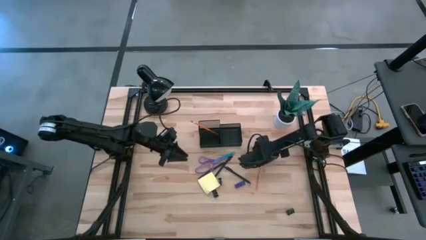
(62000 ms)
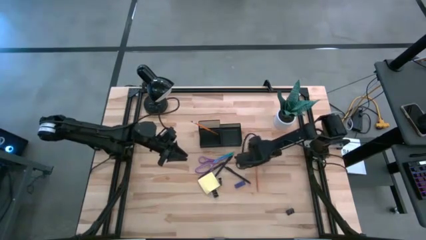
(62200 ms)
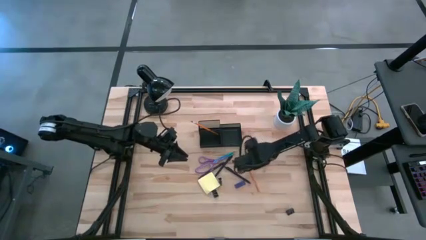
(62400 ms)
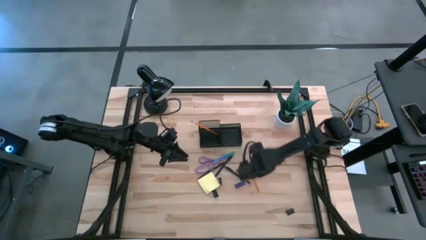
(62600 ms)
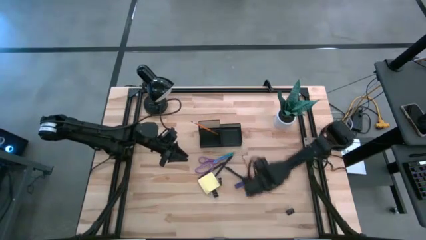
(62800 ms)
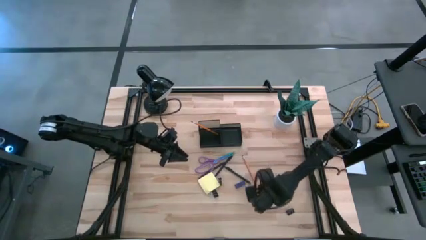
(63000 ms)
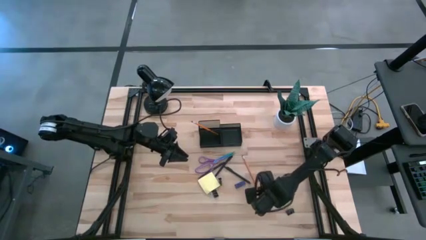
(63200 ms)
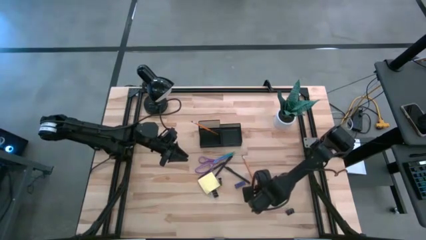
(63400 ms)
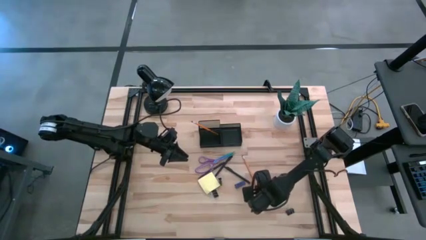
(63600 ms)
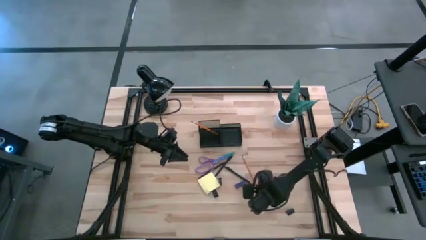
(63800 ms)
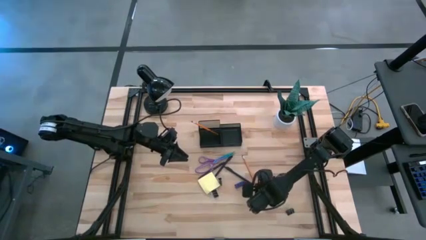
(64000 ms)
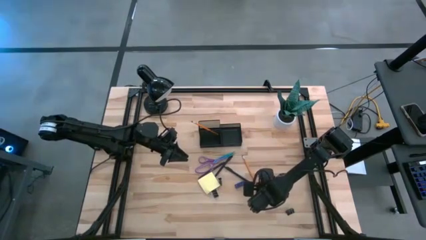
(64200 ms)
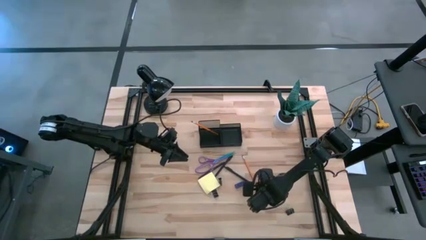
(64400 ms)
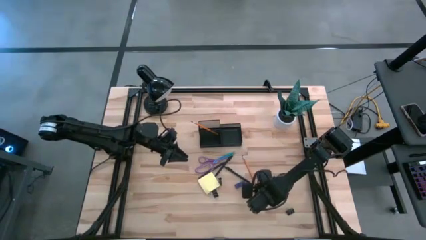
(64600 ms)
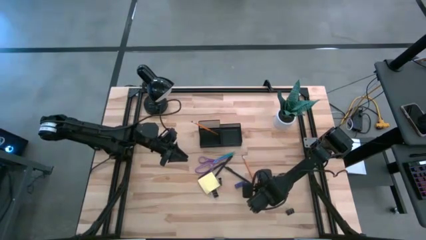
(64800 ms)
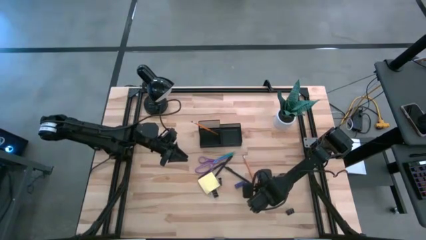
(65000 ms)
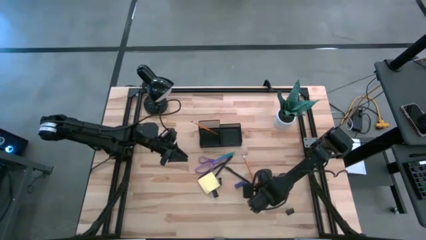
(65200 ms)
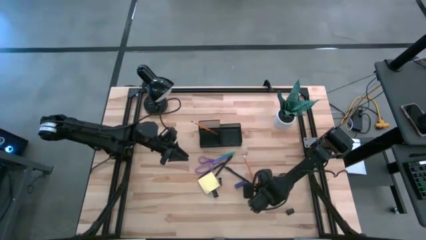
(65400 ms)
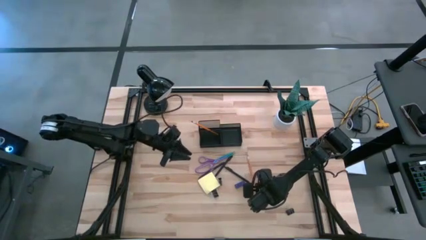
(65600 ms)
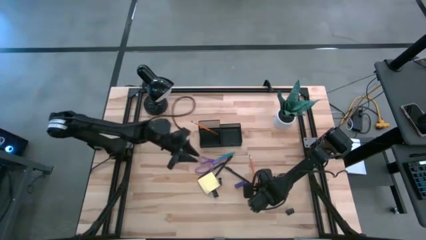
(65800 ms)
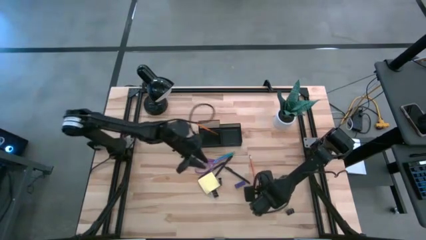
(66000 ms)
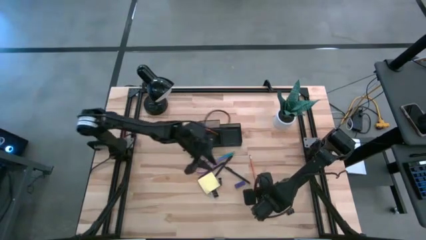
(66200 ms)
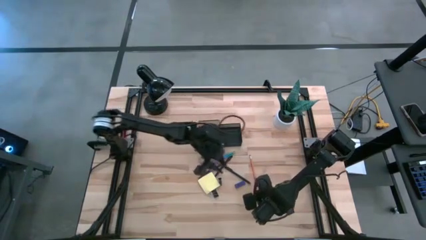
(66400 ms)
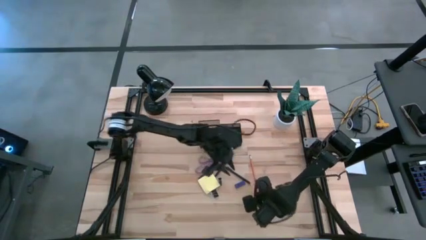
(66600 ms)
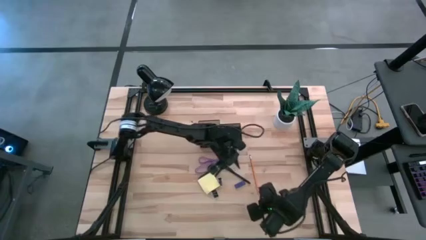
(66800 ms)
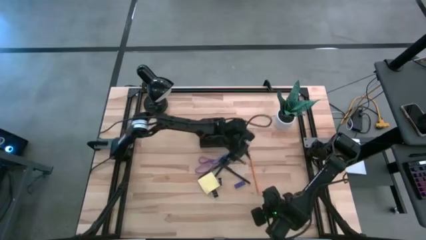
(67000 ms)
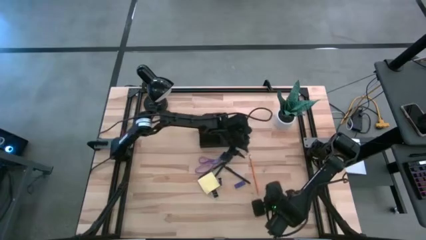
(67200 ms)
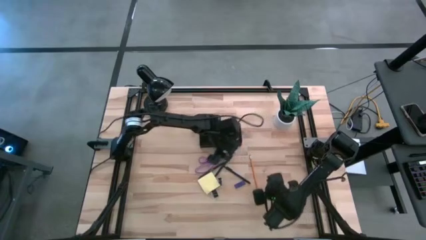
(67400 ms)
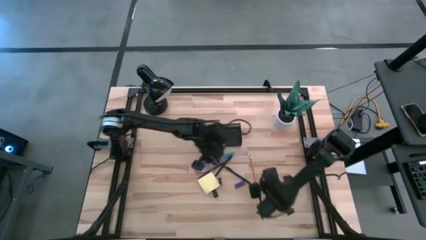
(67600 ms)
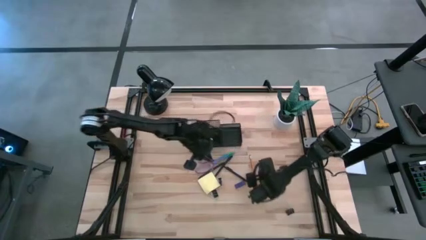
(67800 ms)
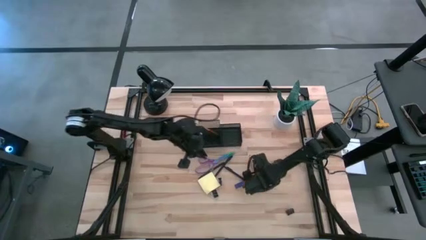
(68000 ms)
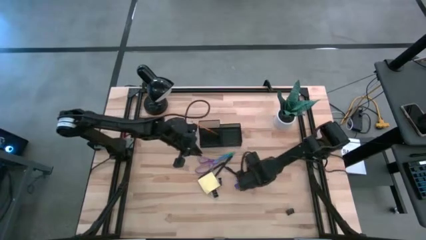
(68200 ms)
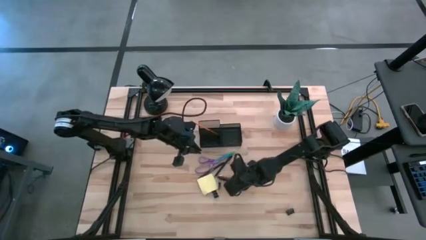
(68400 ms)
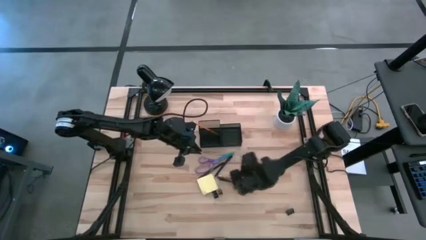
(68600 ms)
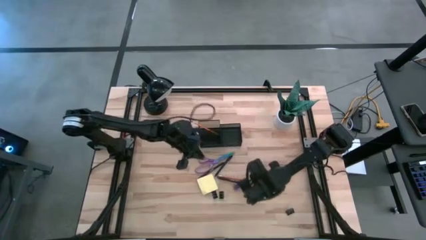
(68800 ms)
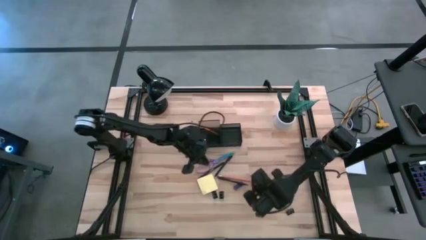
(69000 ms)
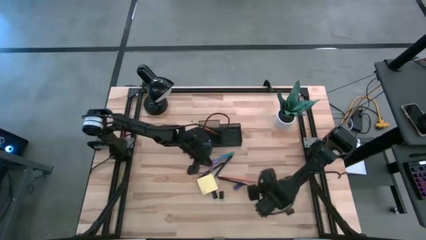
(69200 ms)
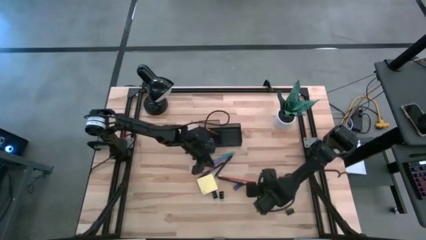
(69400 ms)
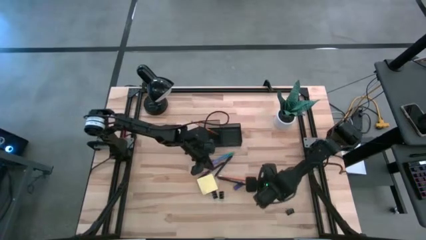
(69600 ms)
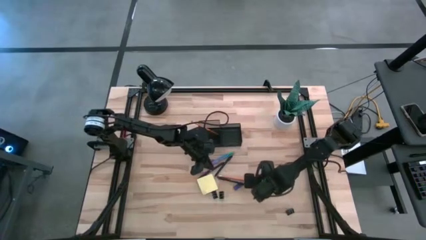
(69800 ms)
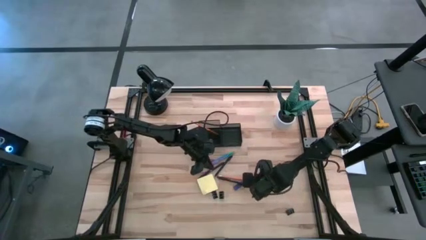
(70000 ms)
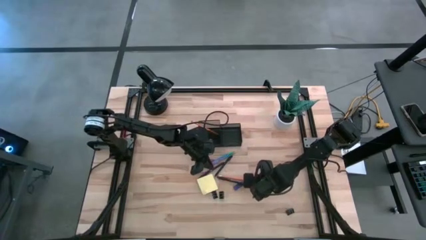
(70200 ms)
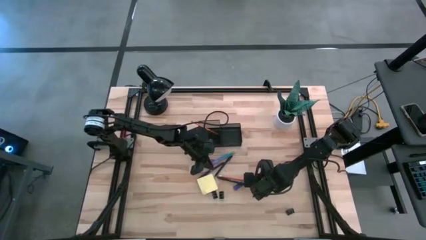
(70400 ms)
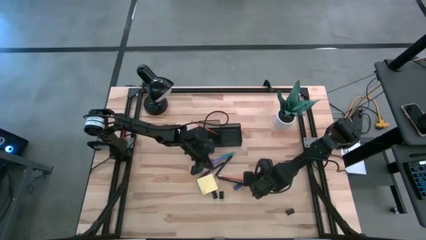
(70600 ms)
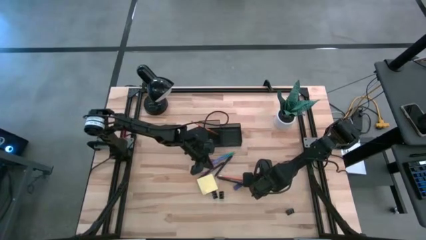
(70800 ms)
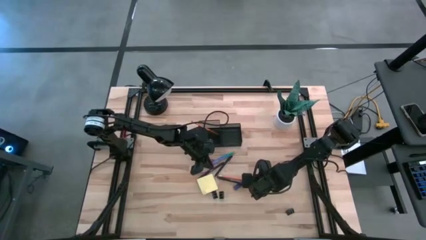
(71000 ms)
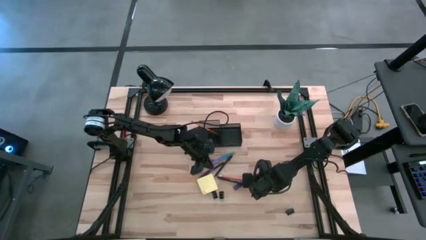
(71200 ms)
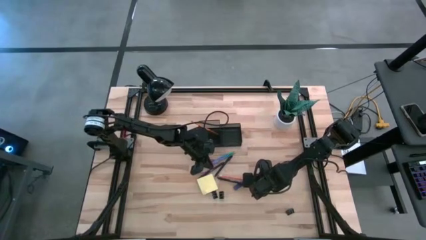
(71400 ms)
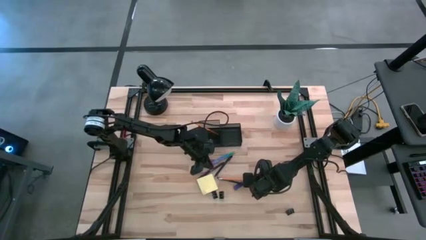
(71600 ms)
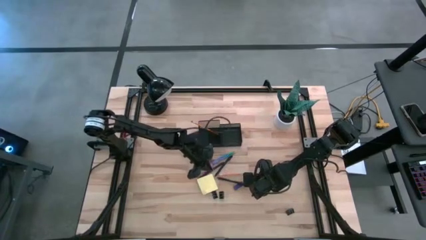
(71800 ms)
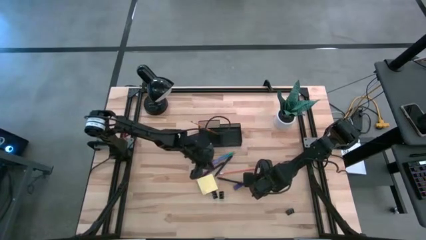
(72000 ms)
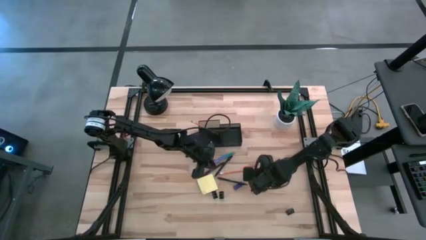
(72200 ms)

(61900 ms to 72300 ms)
Task: Pick and place office supplies into organizer
Put the orange pencil into the black desk organizer

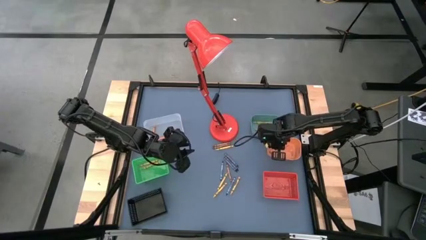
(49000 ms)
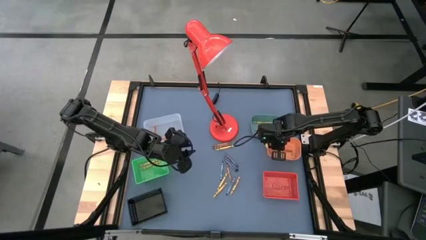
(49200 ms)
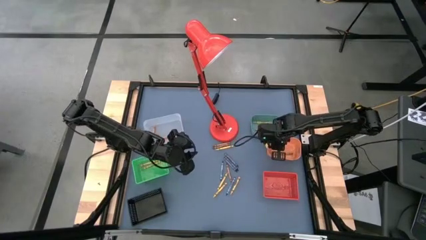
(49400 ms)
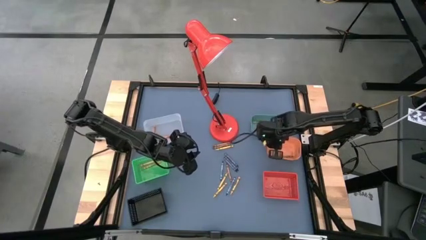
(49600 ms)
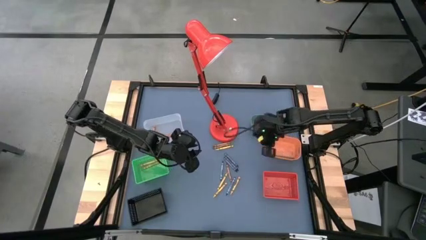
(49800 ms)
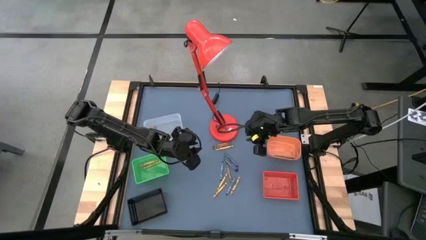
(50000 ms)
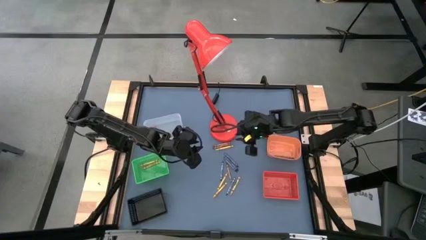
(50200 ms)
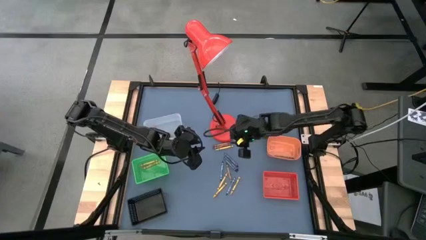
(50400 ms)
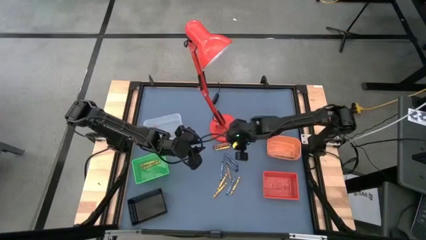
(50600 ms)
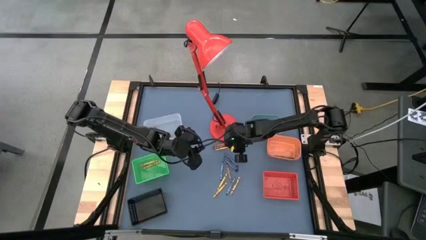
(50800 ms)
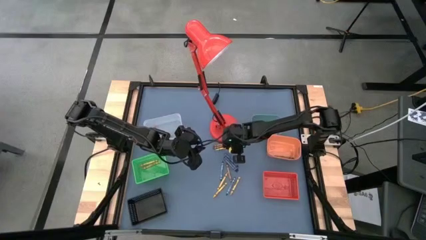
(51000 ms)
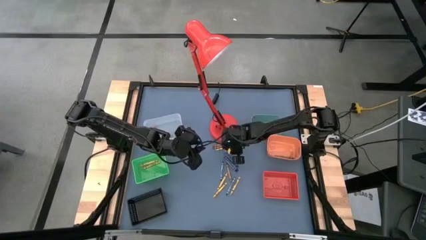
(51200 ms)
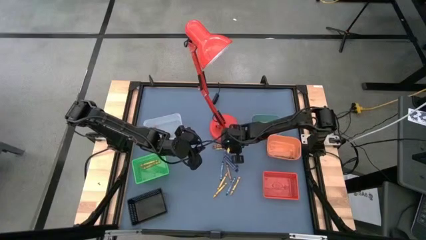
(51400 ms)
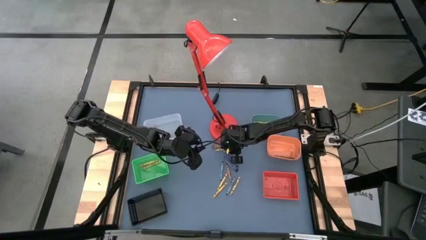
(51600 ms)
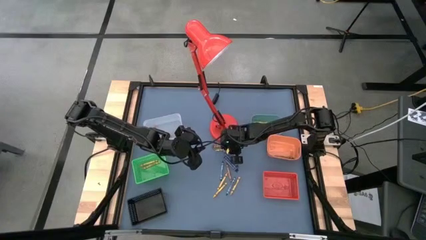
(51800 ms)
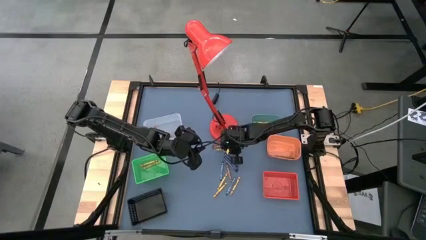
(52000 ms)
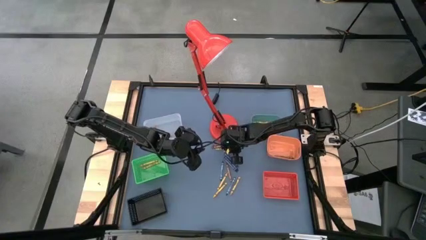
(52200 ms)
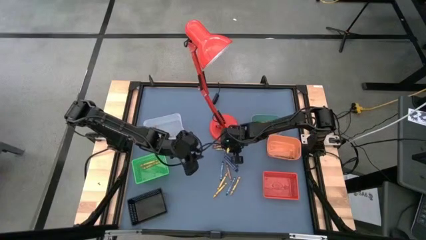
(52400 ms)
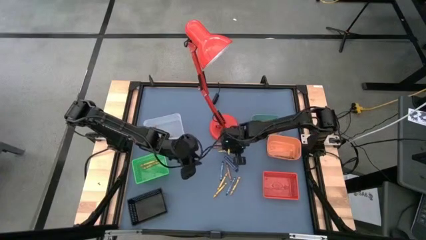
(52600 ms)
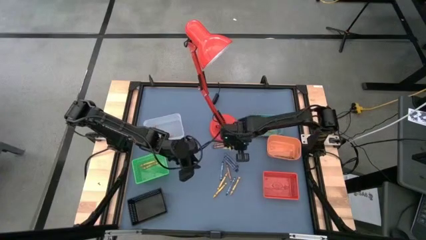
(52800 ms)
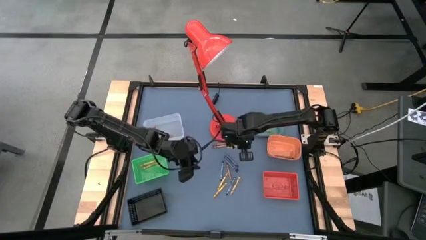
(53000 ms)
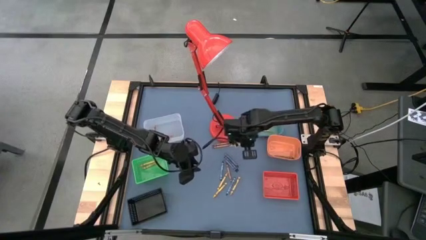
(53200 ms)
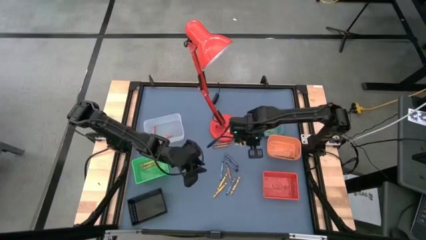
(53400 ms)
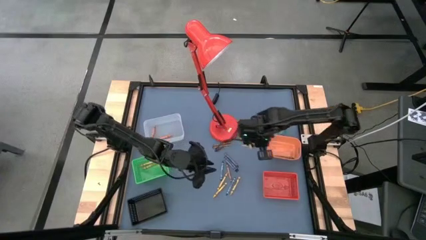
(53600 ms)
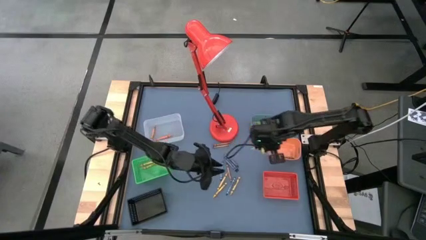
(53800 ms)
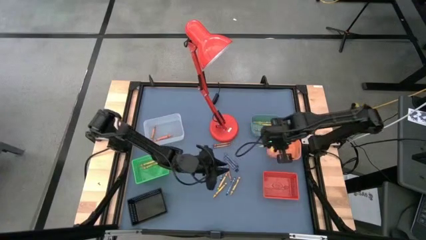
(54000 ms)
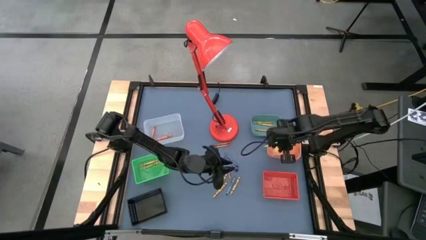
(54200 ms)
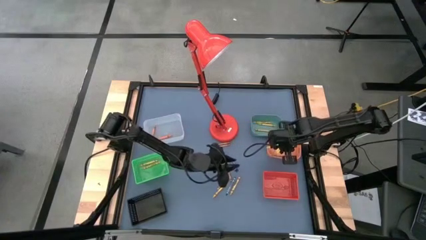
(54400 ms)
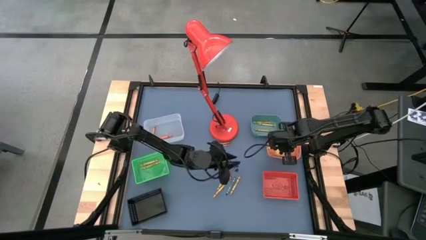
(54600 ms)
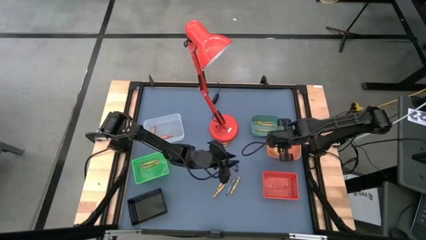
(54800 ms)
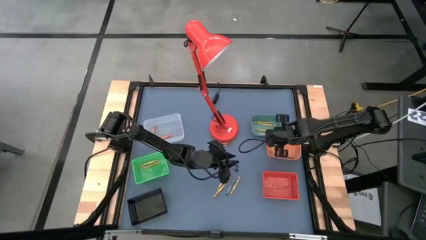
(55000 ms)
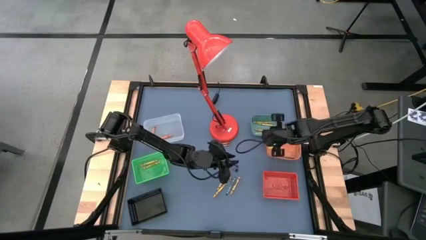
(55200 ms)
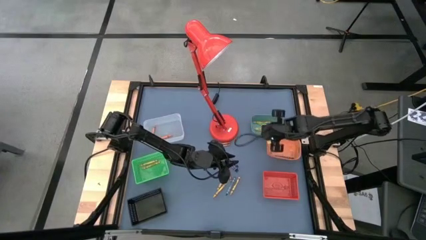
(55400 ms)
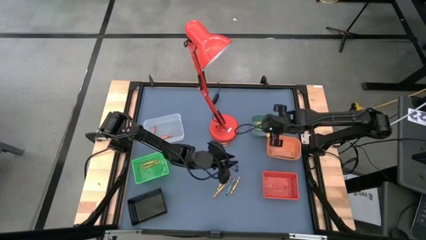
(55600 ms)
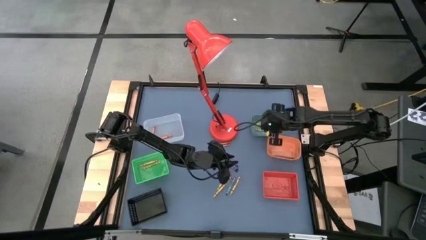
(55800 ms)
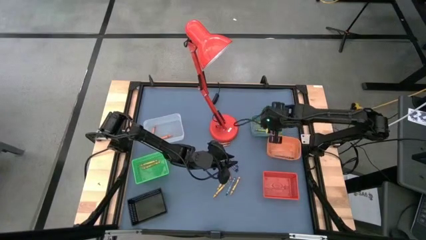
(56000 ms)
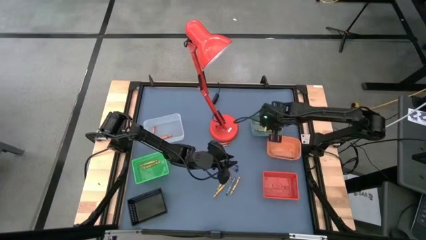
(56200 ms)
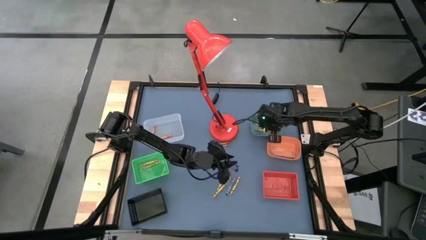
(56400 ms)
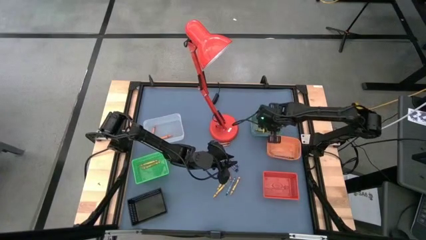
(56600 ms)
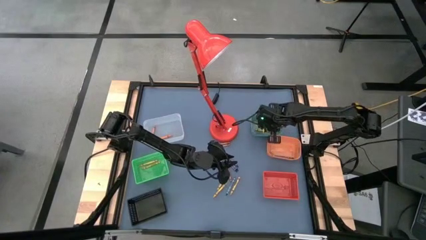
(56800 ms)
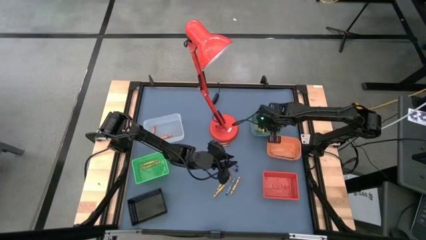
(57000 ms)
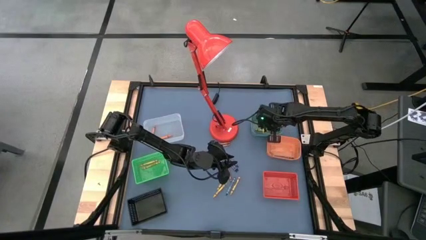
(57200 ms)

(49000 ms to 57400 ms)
Task: Sort crayons
Put the yellow crayon into the blue bin
